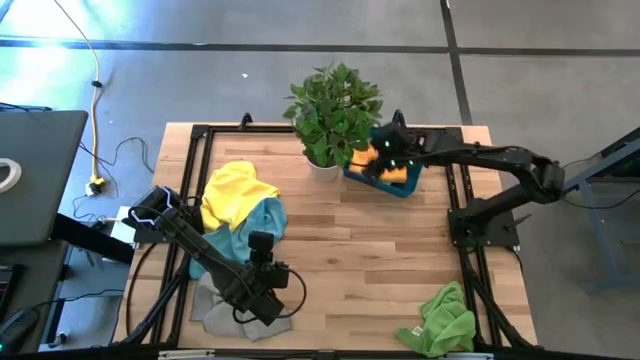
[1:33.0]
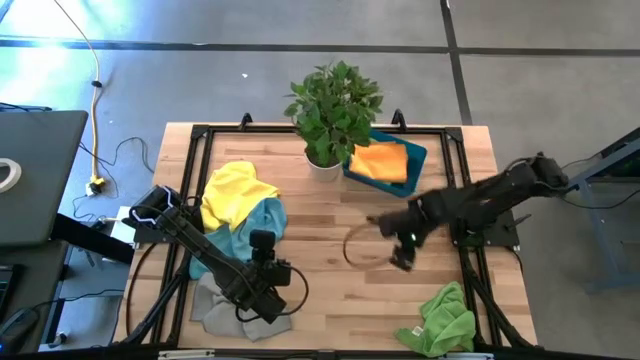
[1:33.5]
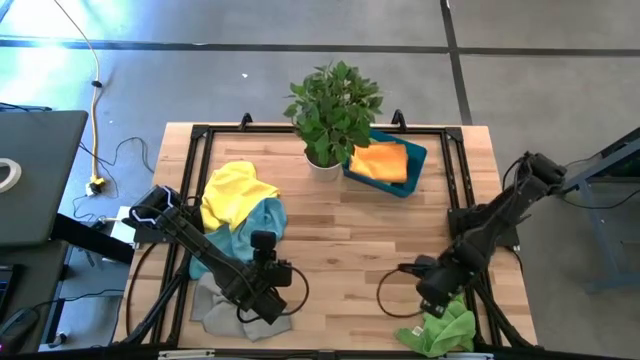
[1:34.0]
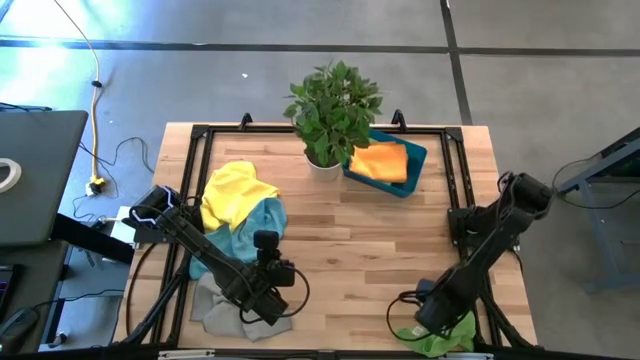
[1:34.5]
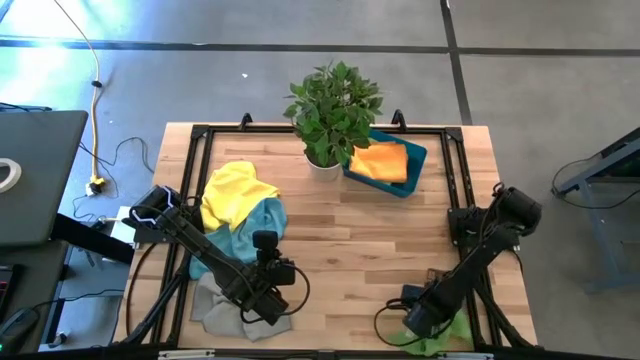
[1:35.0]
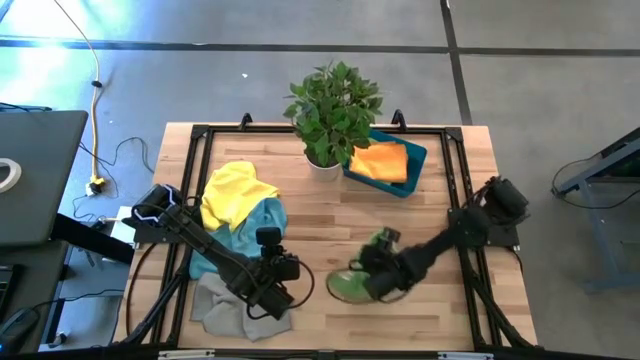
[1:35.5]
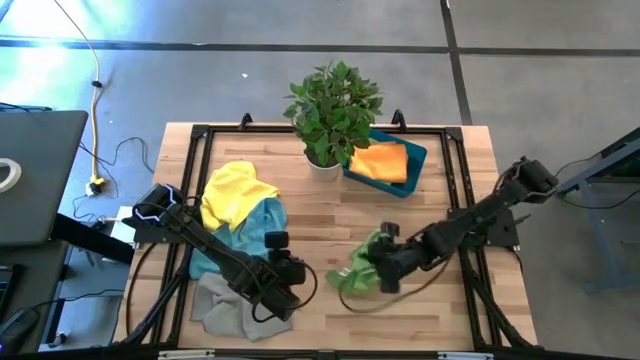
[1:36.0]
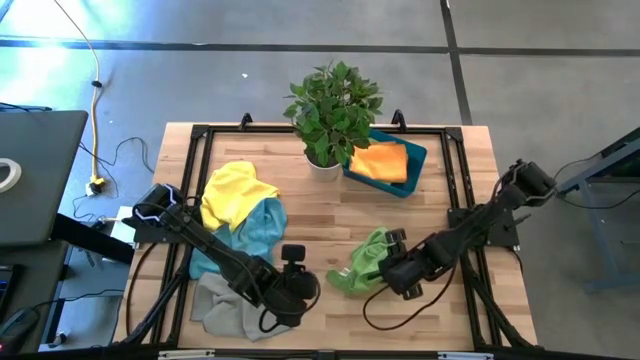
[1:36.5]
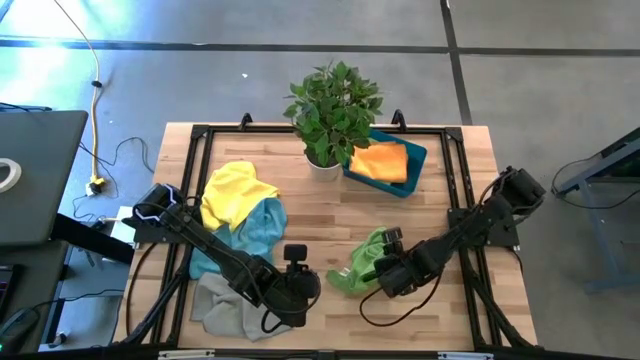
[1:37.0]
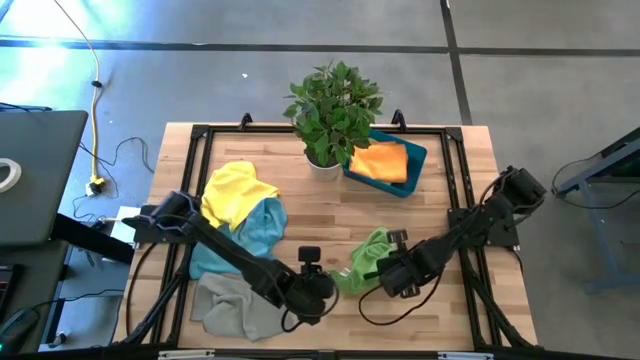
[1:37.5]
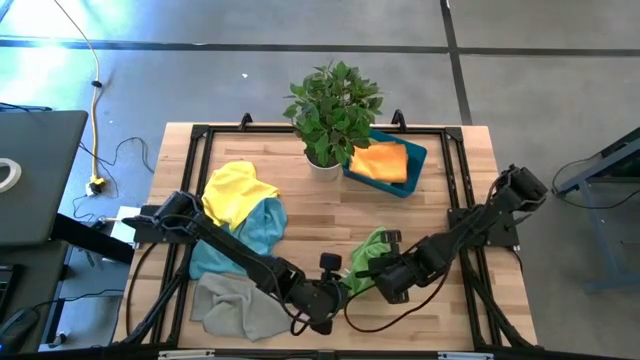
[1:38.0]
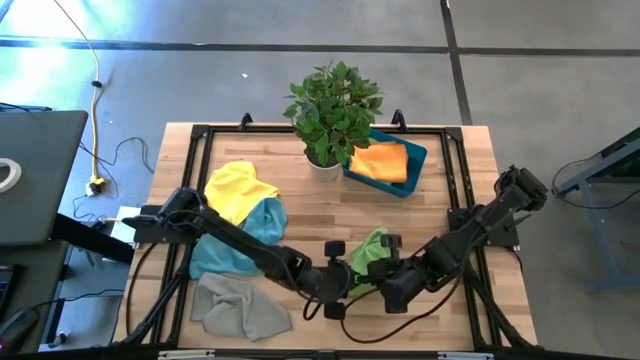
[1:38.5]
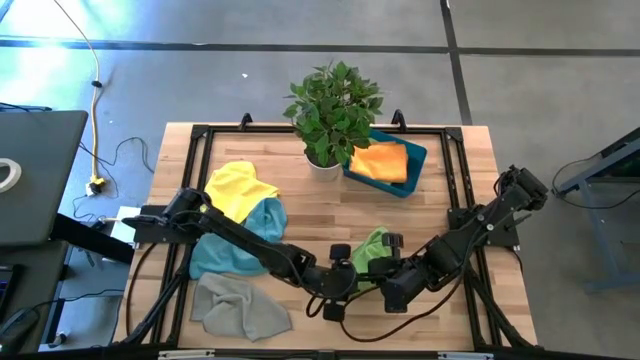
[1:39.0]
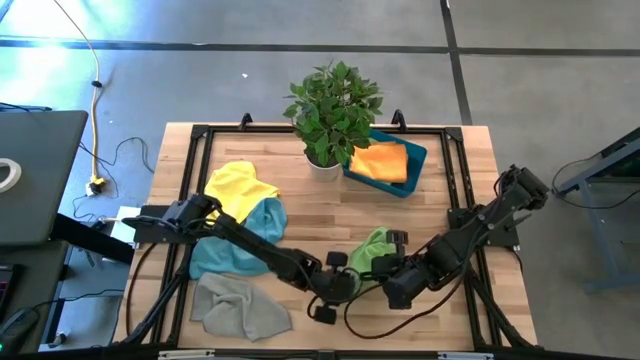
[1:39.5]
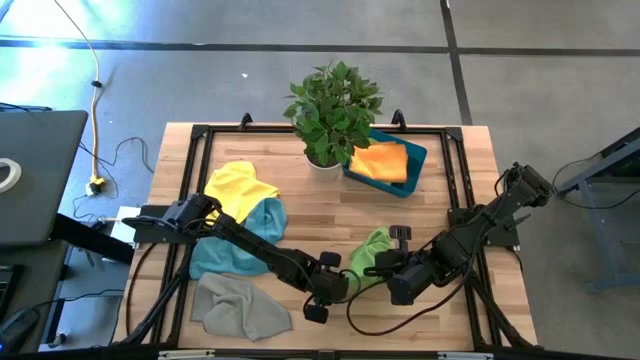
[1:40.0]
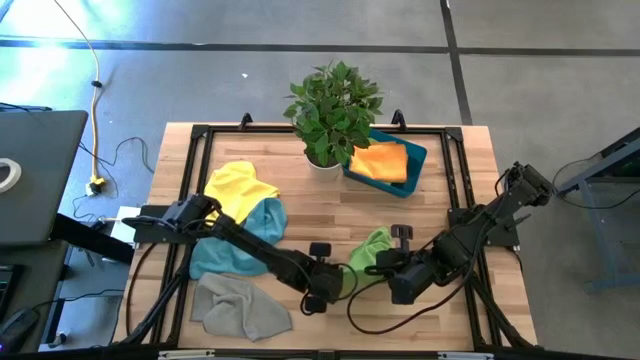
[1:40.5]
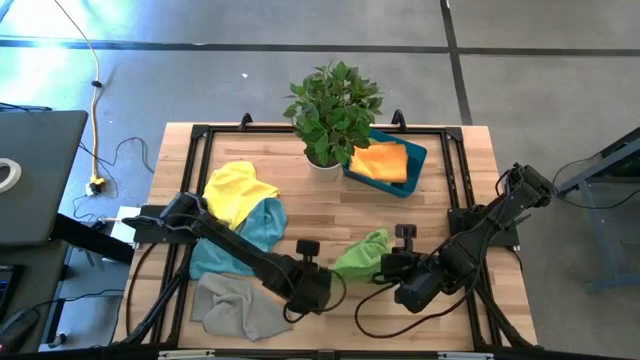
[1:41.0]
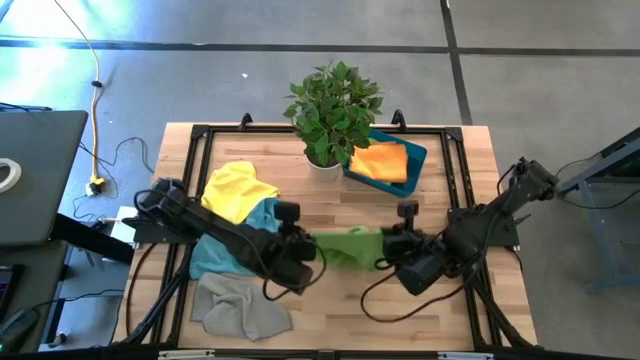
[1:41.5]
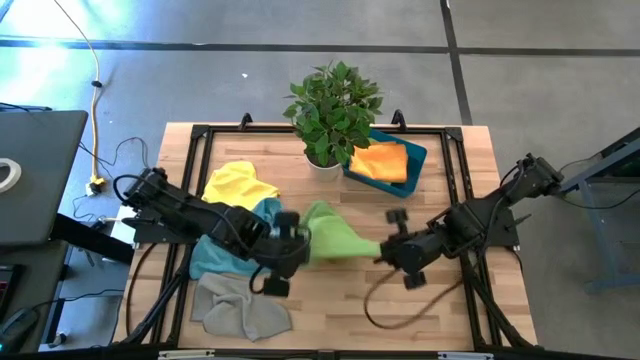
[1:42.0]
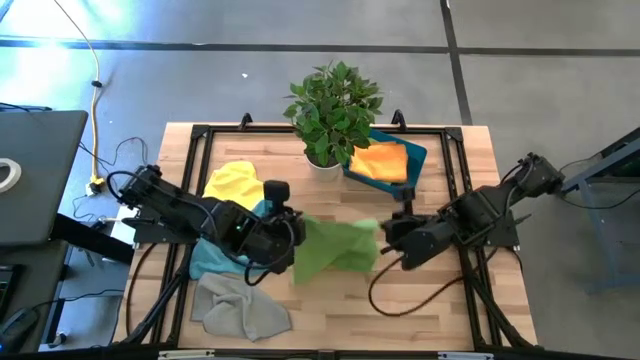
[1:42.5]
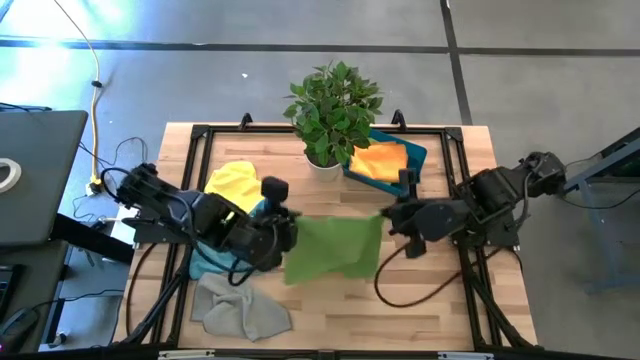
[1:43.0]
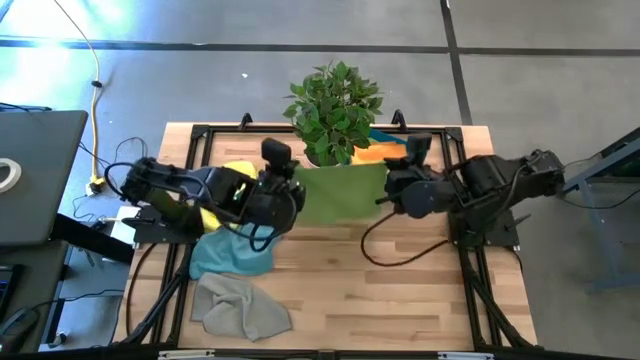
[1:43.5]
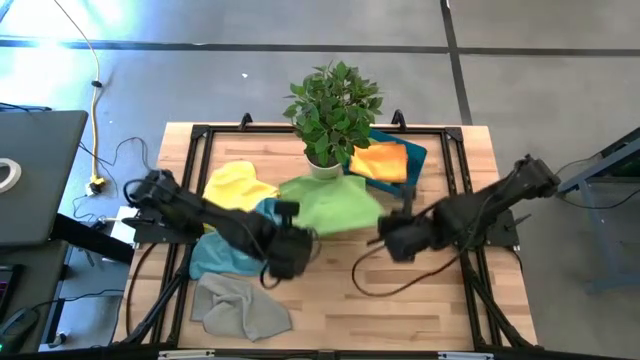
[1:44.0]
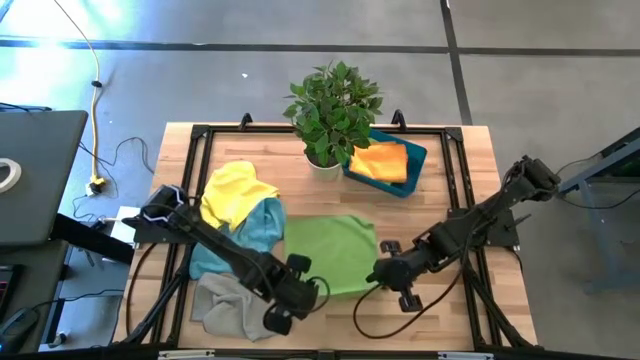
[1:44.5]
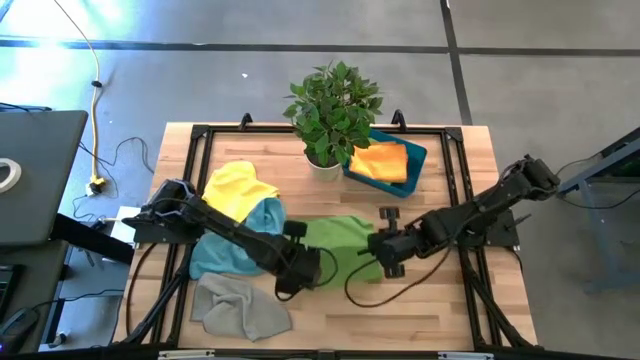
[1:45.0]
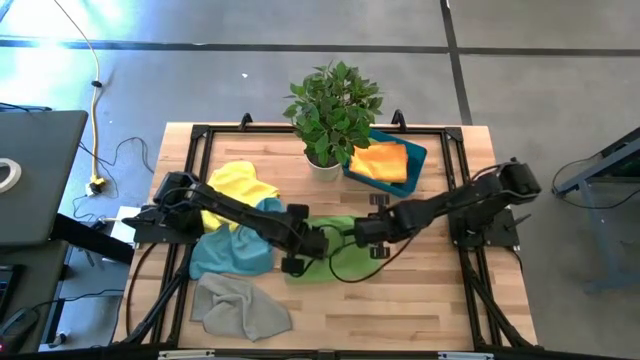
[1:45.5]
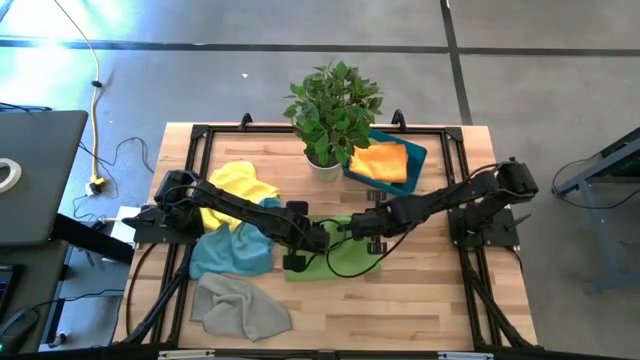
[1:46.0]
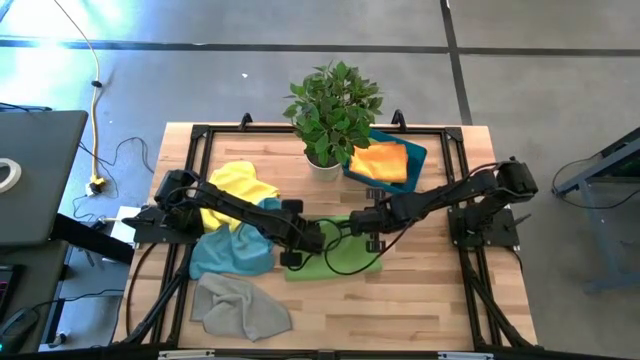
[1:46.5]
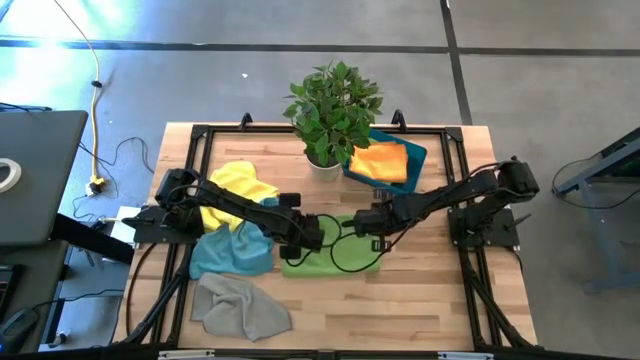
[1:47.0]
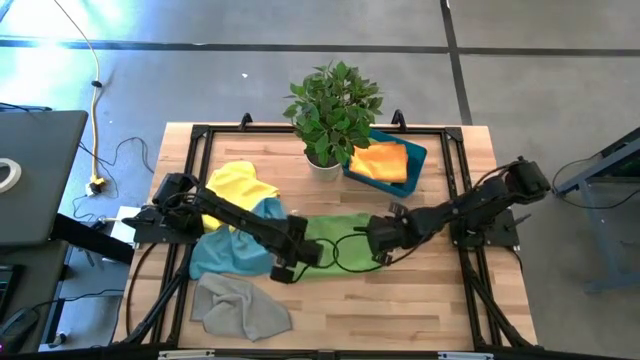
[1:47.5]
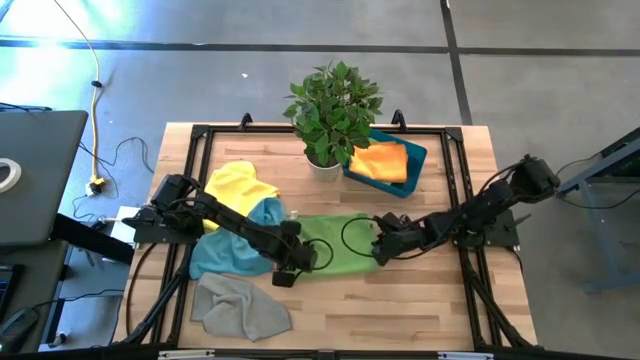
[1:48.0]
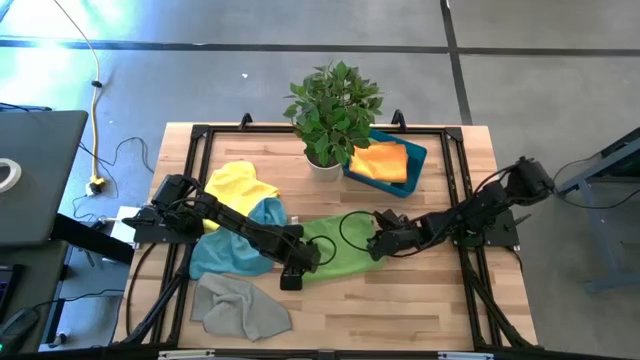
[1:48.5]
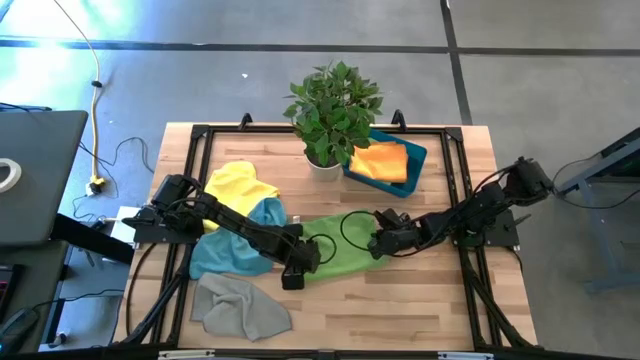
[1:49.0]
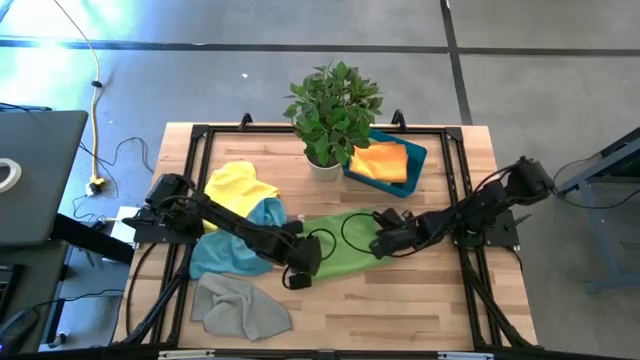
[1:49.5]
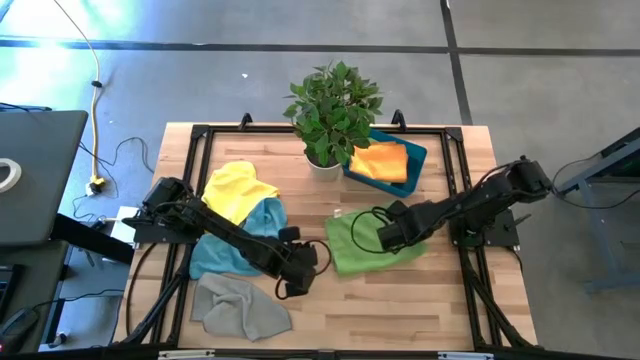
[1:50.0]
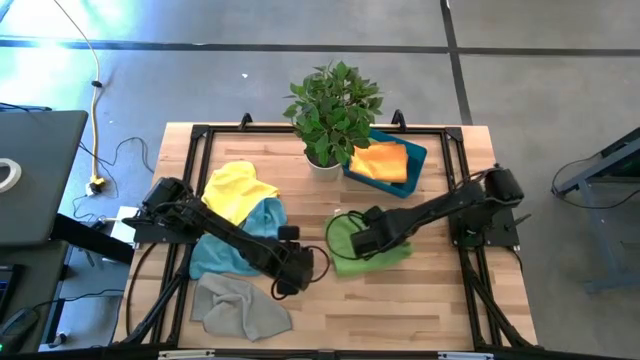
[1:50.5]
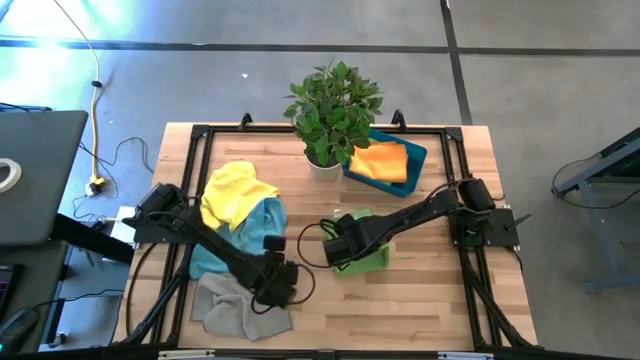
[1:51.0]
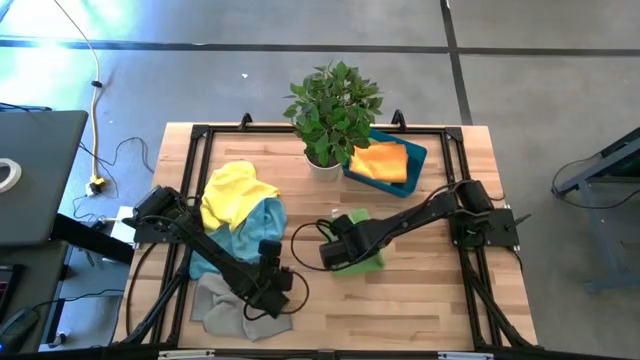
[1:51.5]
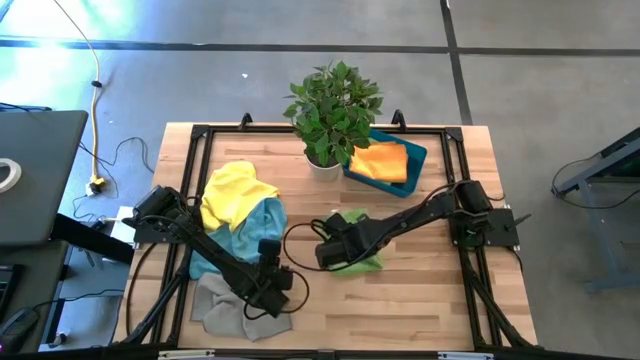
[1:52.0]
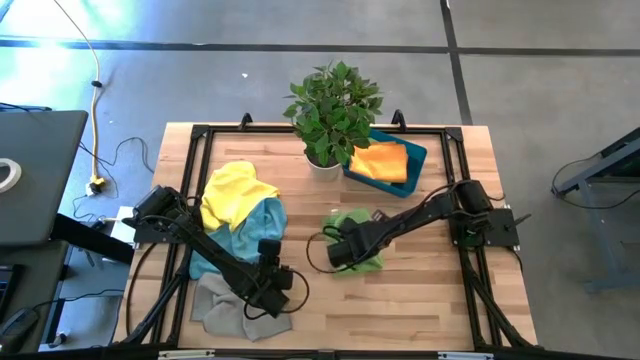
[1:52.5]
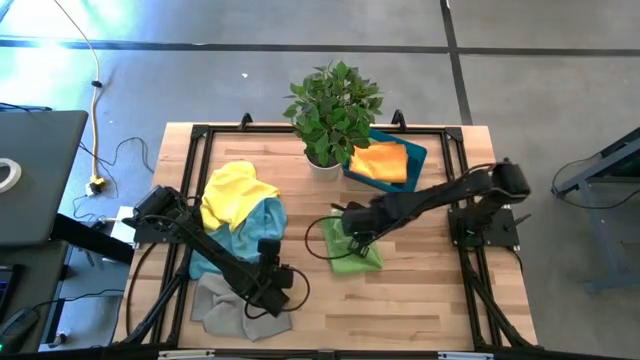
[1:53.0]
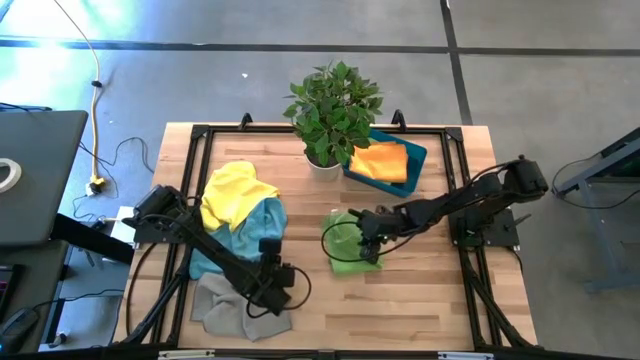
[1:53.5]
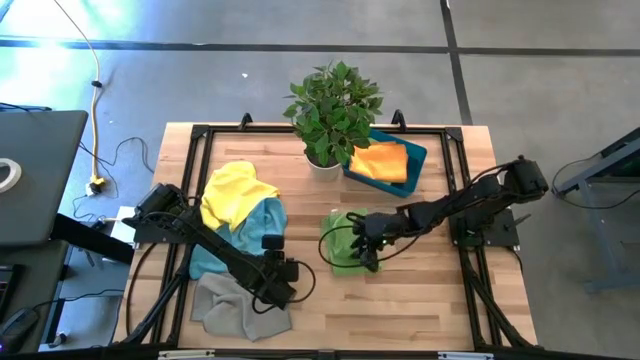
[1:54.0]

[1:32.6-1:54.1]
Task: Fold microfiber towels
Fold the green towel
